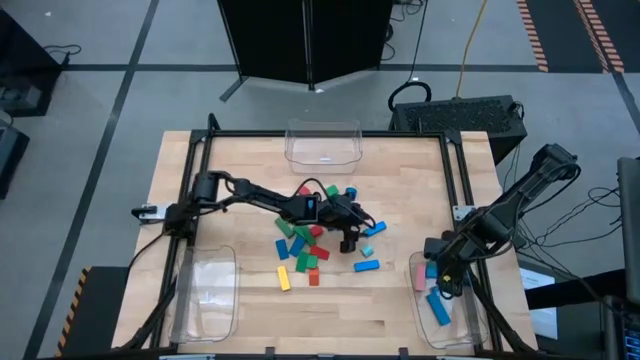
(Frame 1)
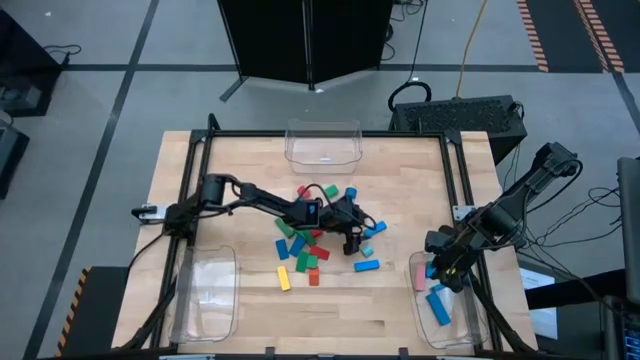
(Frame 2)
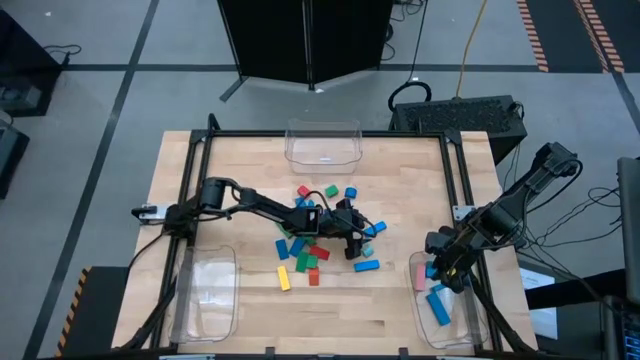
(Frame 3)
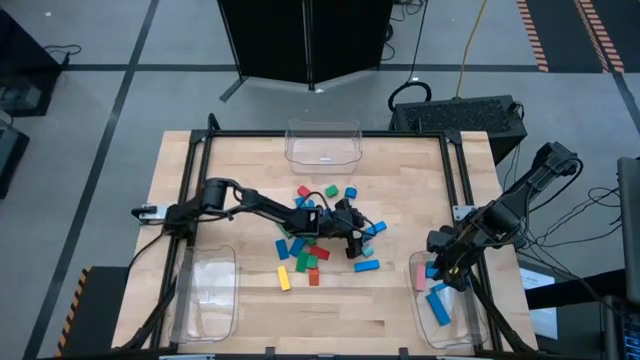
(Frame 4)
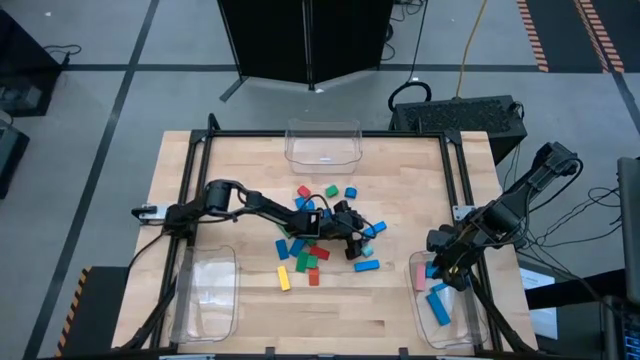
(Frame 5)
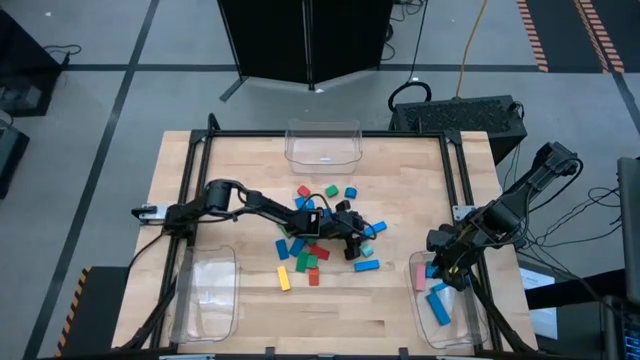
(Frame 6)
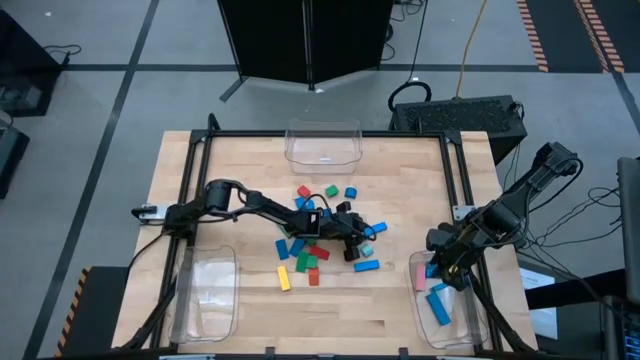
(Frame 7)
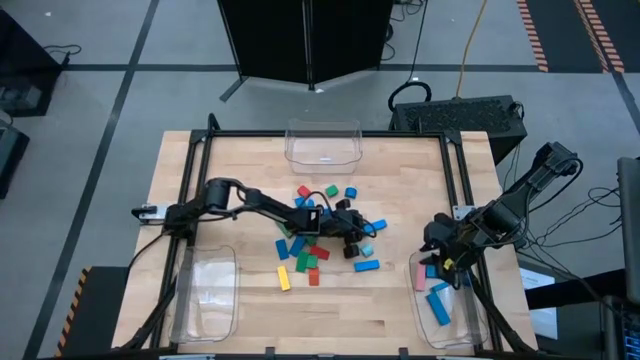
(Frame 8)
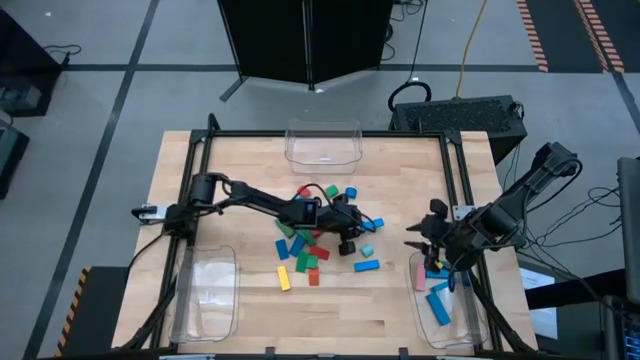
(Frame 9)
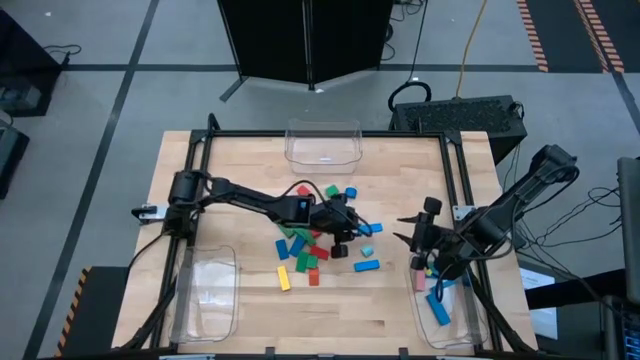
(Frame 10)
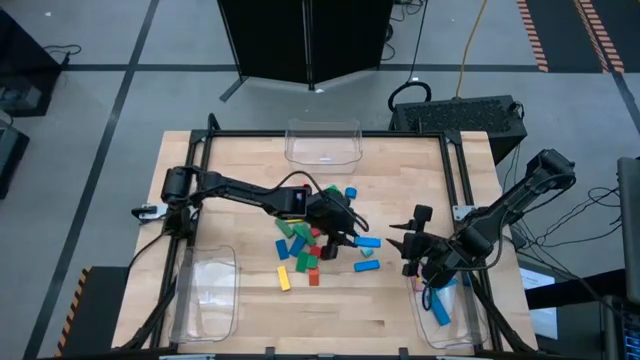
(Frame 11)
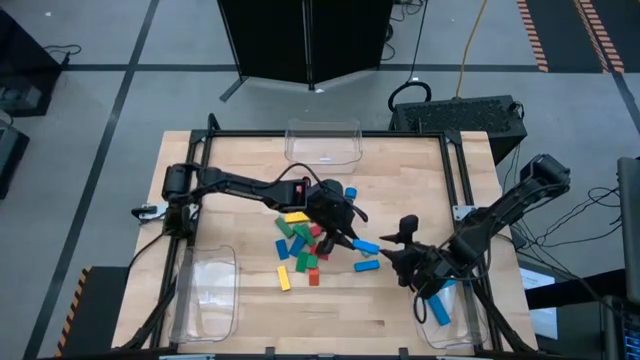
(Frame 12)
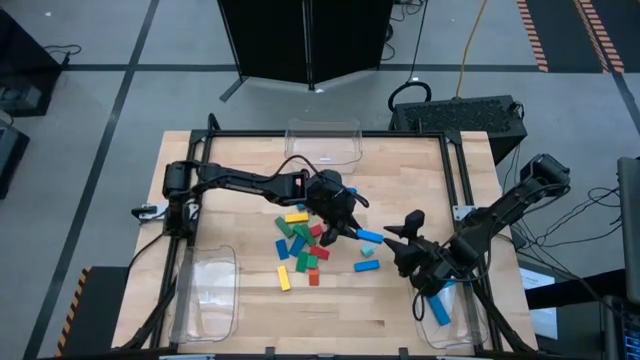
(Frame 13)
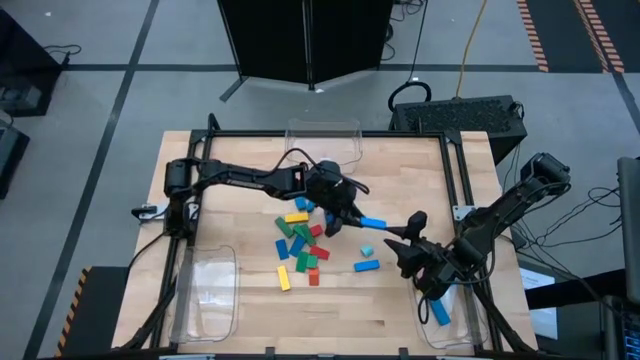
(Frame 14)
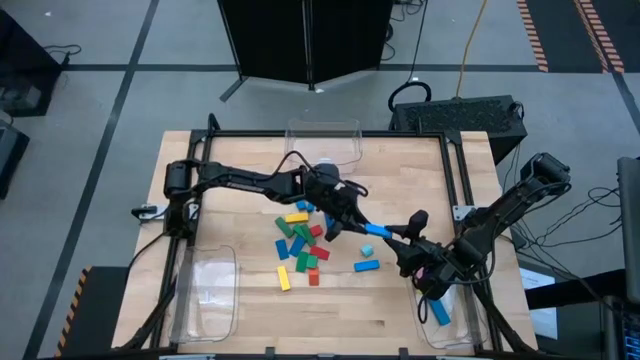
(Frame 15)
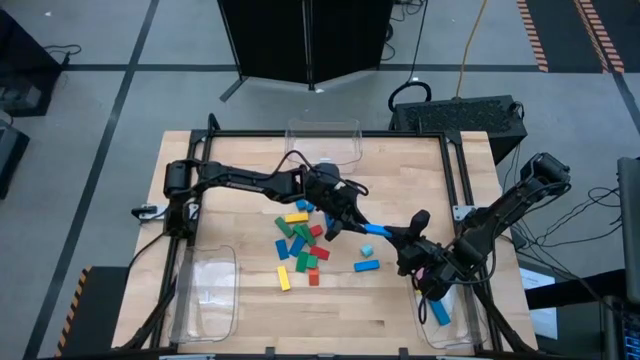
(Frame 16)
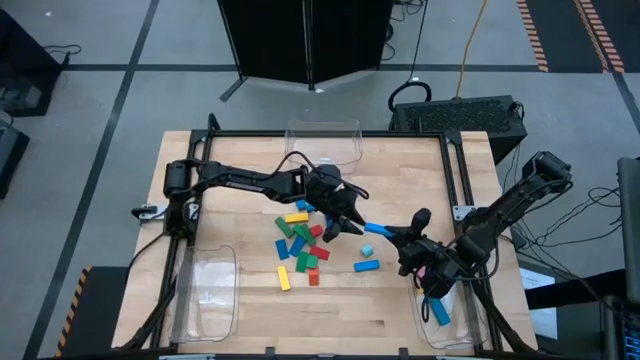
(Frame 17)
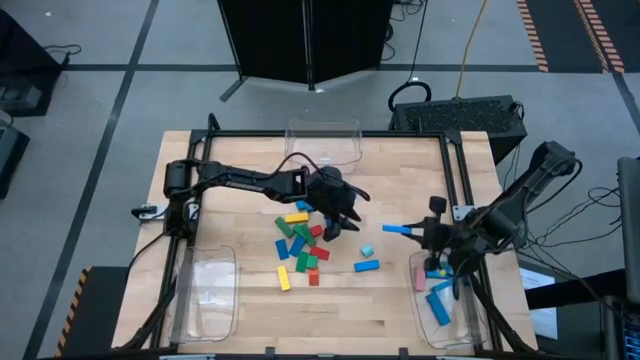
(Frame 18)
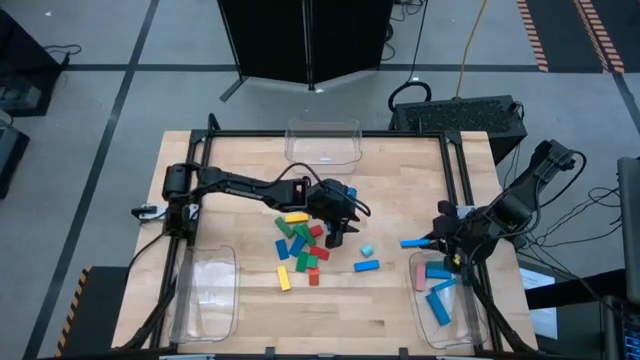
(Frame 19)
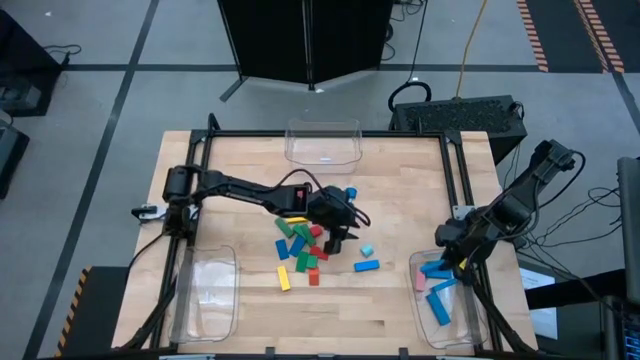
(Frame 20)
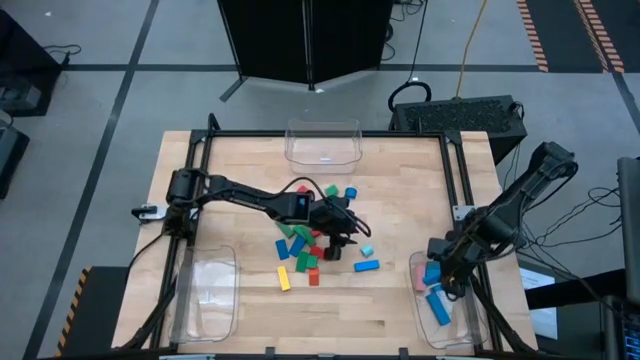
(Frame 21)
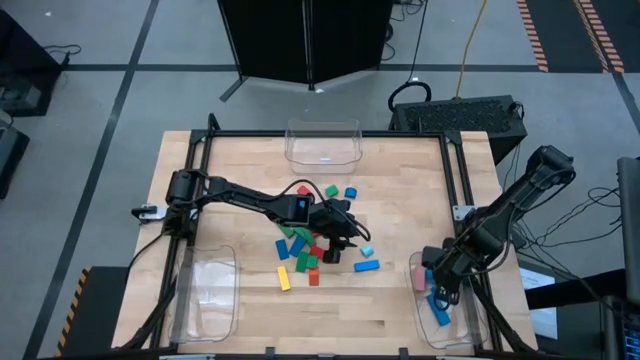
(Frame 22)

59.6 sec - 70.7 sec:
Task: Sort blocks by size
Put the light blue rectangle block into the bottom right transparent bin

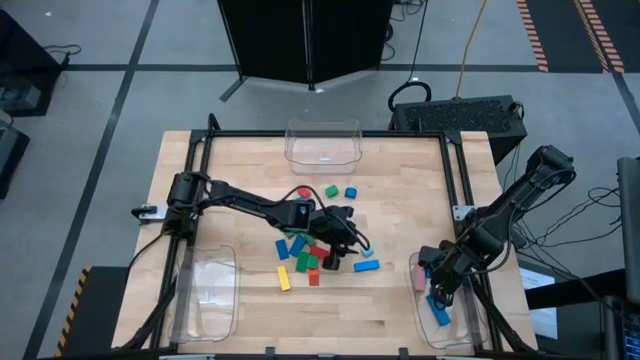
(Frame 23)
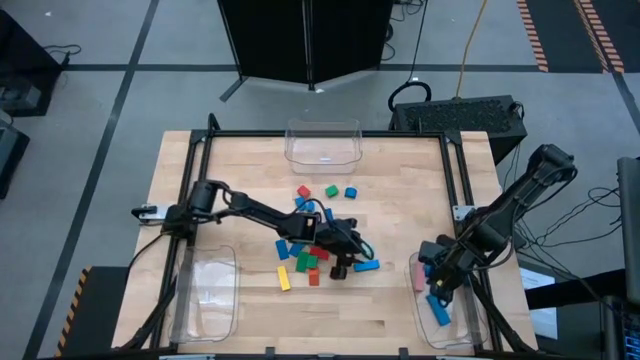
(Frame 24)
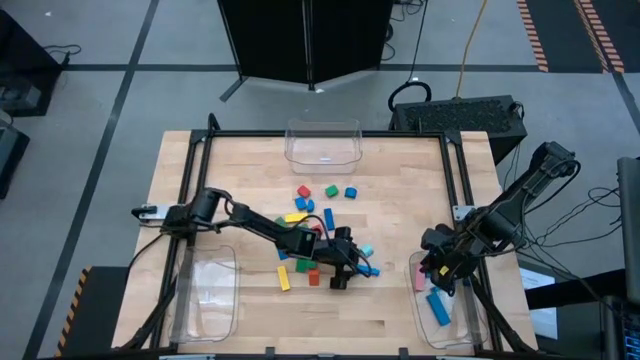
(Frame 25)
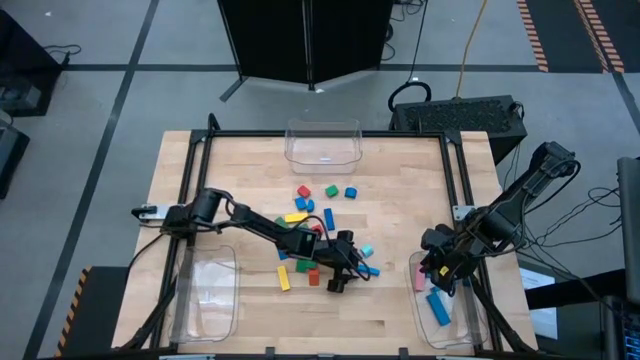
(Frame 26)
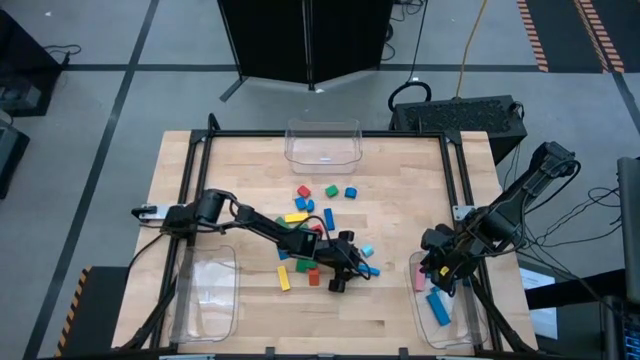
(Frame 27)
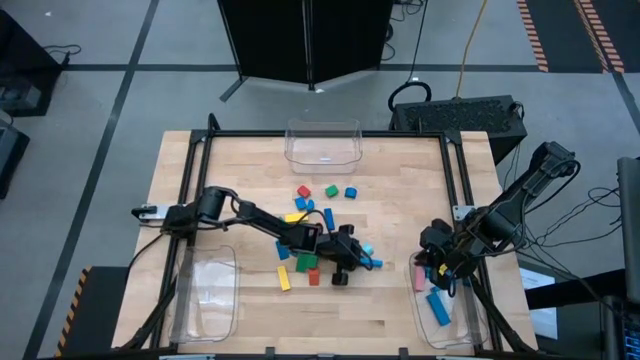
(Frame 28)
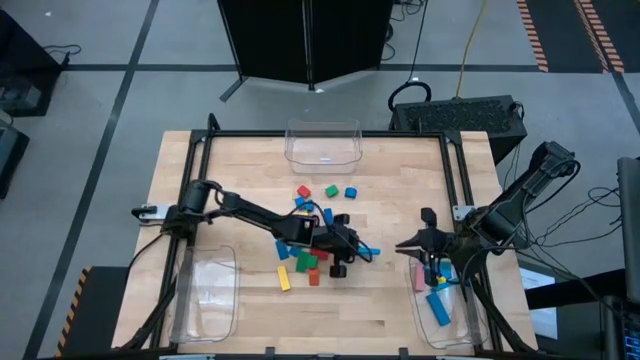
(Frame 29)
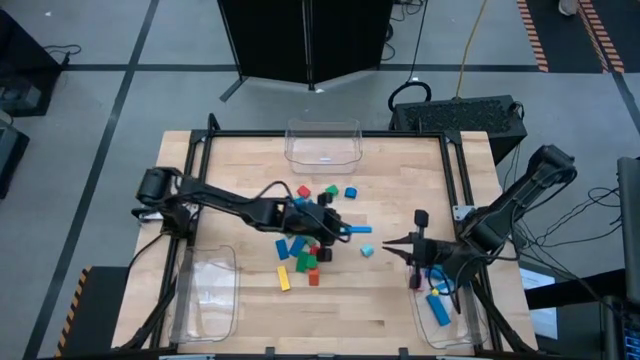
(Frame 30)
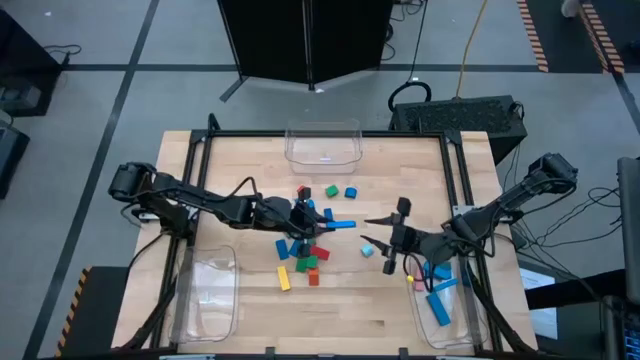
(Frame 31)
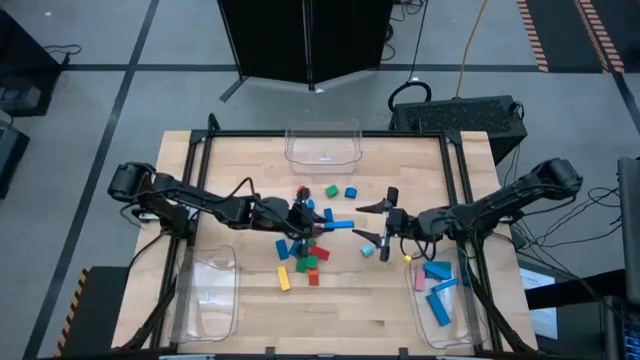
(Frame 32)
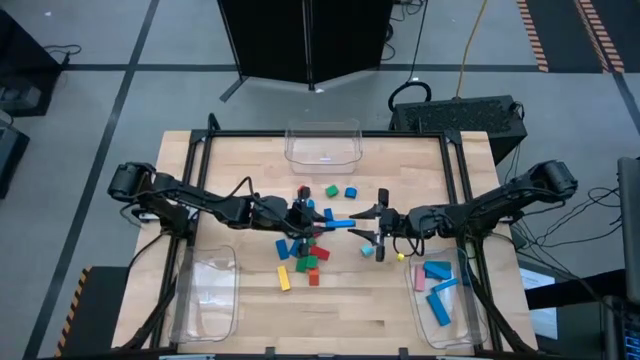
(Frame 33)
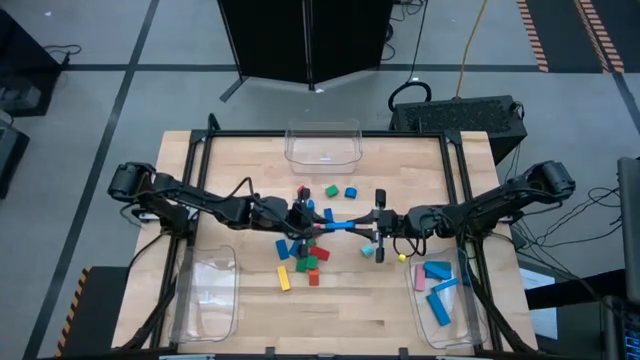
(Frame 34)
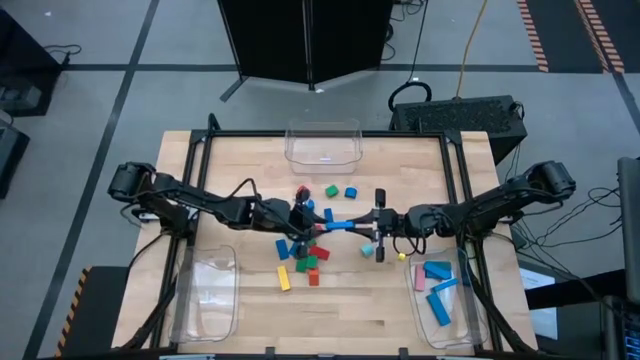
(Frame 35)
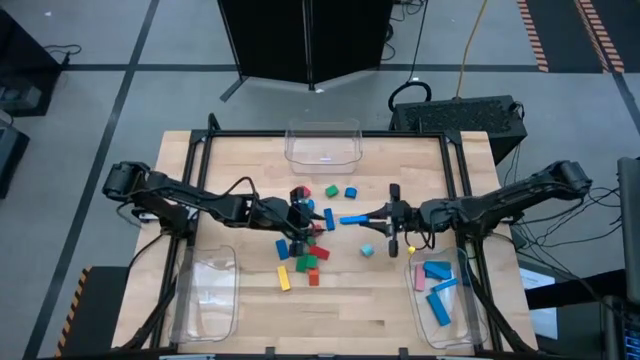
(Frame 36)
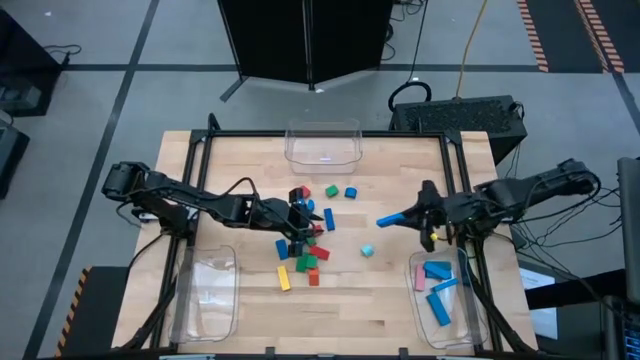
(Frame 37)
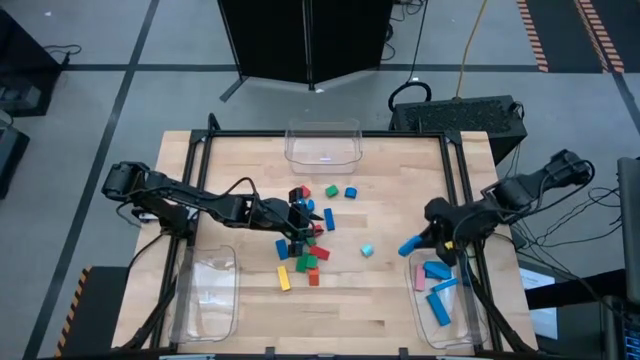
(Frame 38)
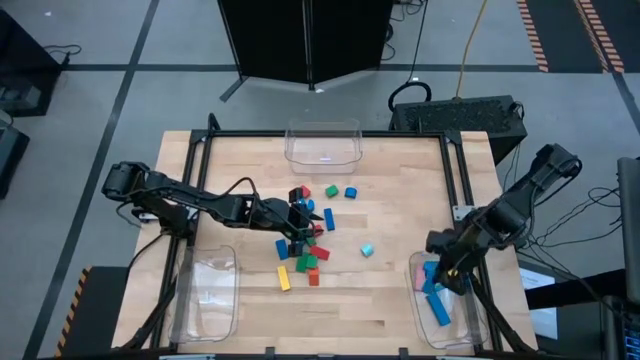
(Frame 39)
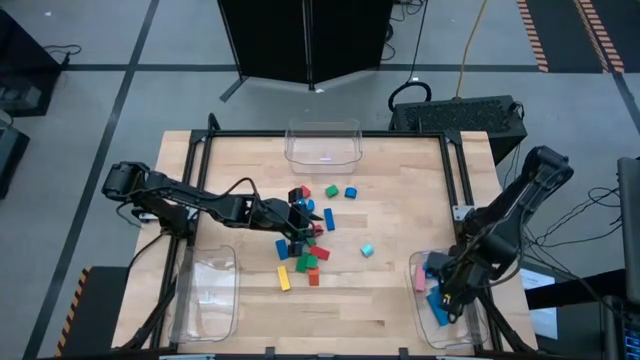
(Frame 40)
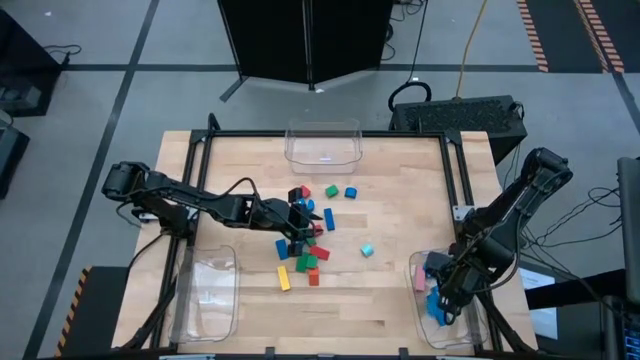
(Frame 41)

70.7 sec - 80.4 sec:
Put the light blue rectangle block into the bottom right transparent bin

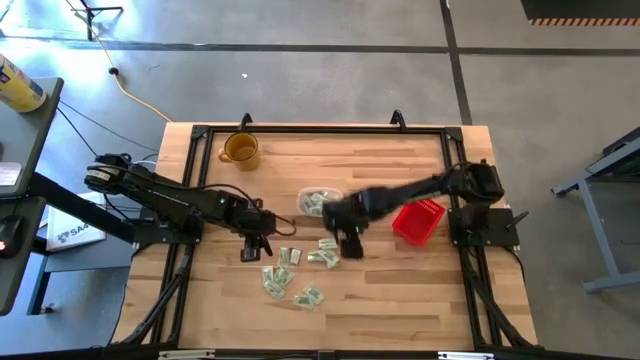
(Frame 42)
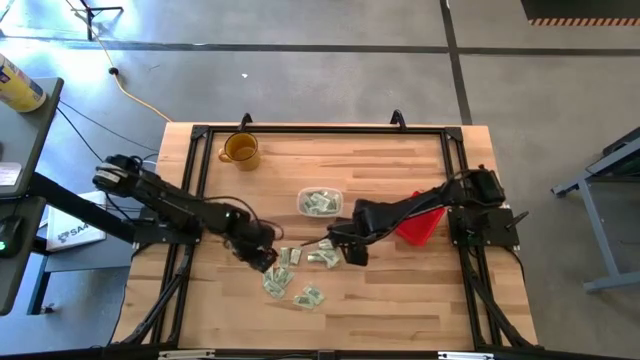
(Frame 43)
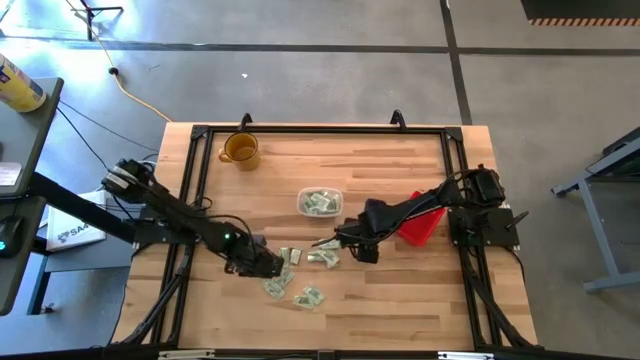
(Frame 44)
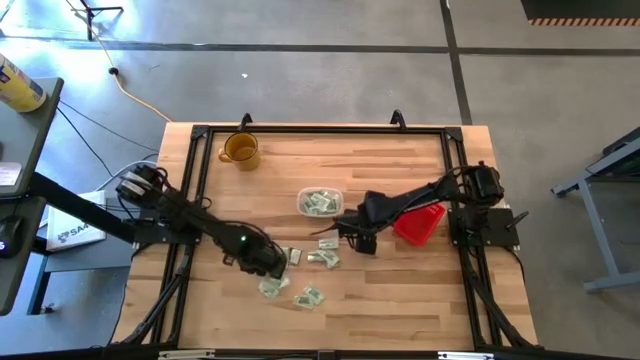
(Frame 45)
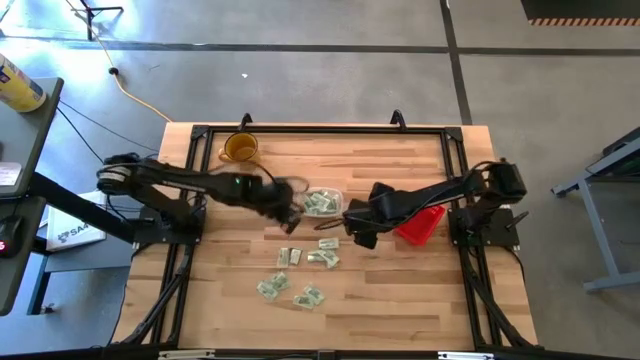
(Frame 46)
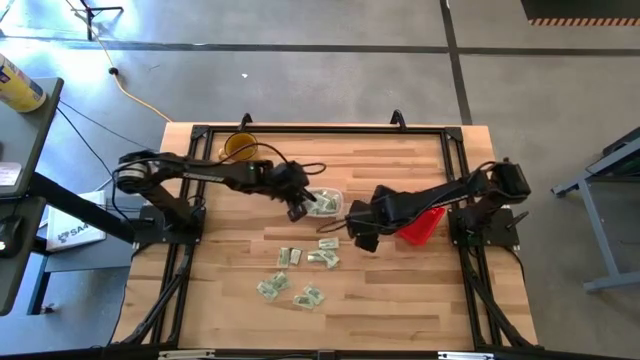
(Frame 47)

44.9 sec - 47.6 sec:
Task: Pick and place items into bin
Put the white stevia packet into the transparent bin
